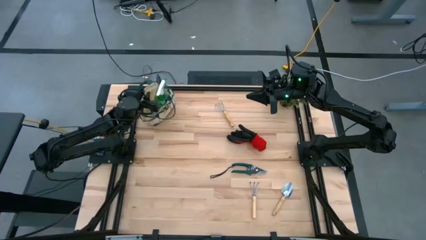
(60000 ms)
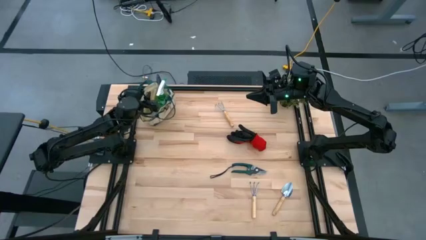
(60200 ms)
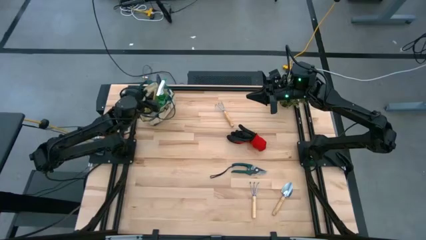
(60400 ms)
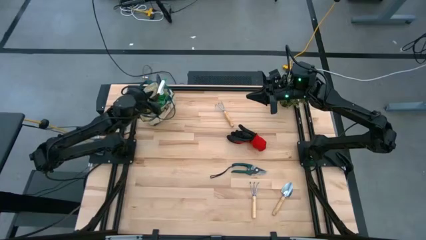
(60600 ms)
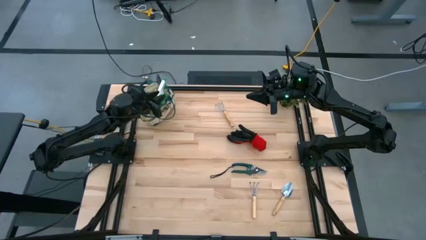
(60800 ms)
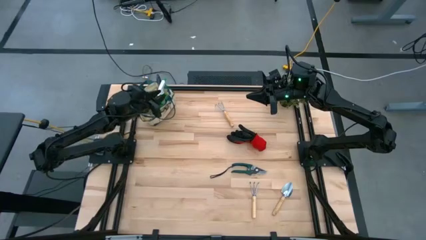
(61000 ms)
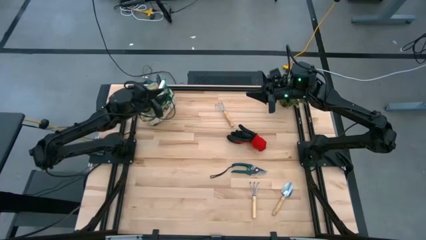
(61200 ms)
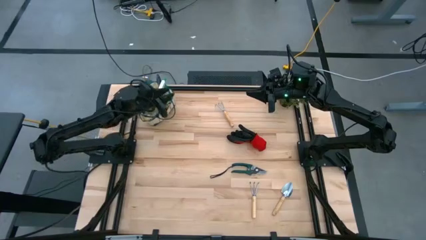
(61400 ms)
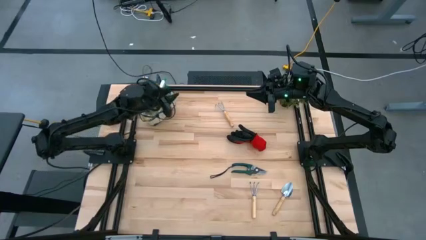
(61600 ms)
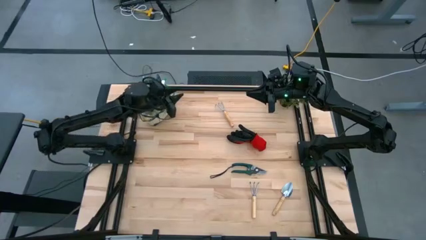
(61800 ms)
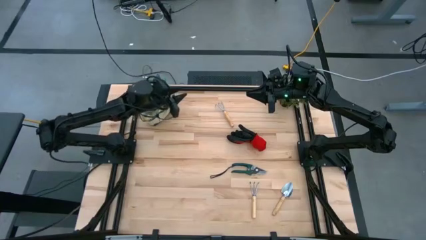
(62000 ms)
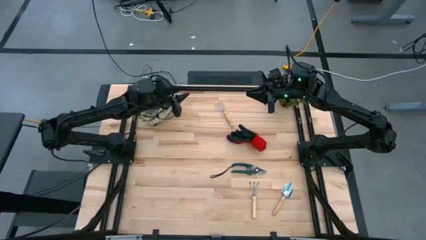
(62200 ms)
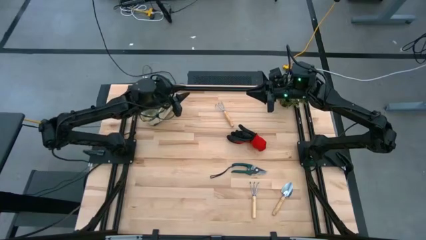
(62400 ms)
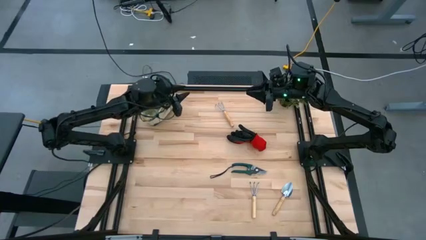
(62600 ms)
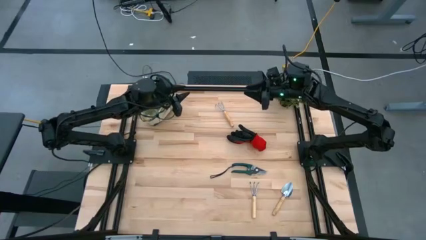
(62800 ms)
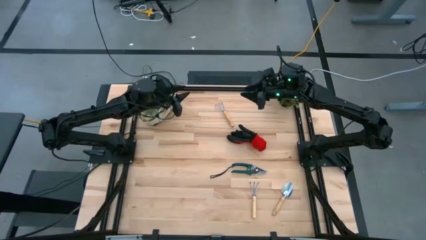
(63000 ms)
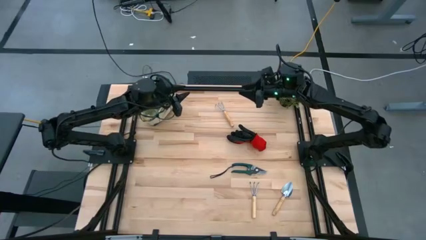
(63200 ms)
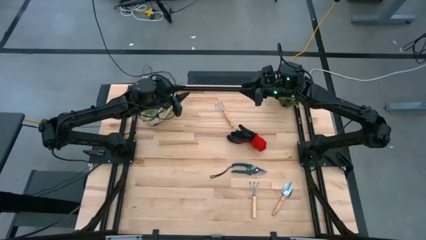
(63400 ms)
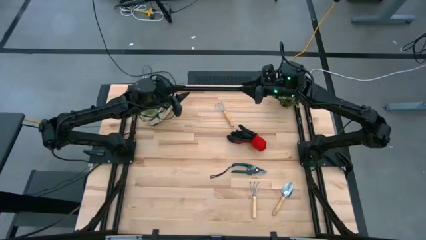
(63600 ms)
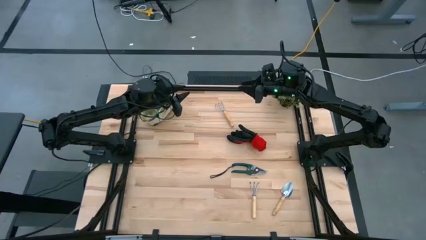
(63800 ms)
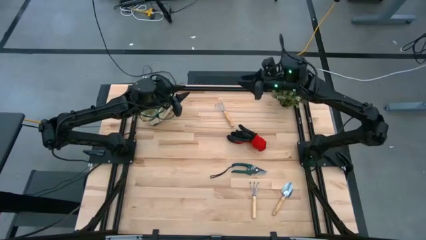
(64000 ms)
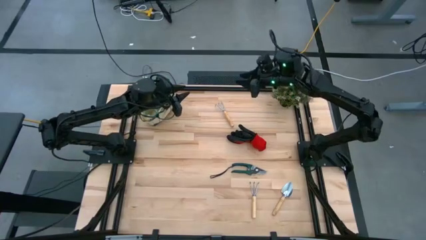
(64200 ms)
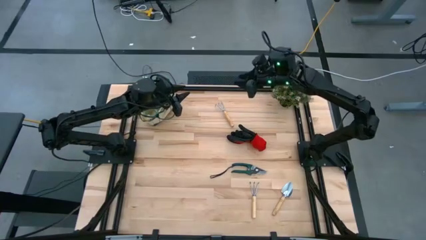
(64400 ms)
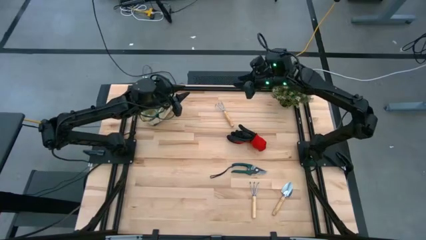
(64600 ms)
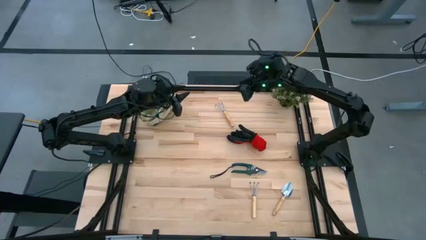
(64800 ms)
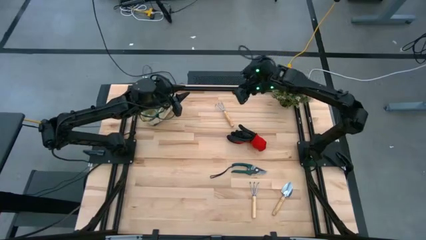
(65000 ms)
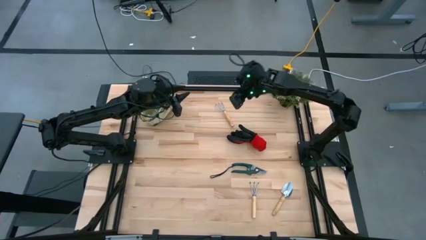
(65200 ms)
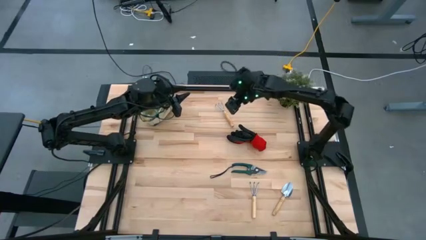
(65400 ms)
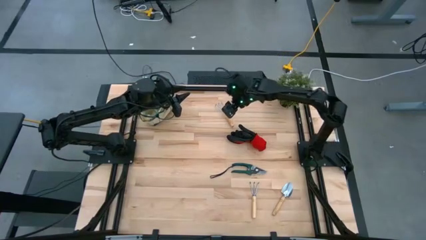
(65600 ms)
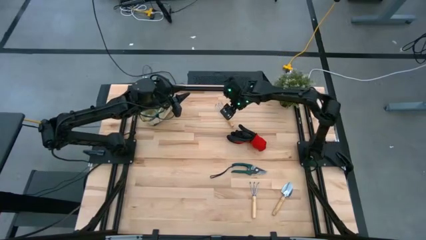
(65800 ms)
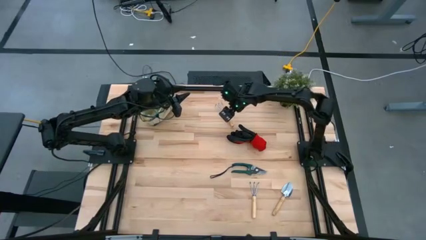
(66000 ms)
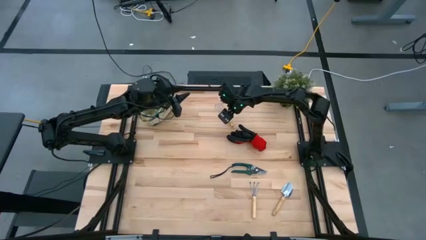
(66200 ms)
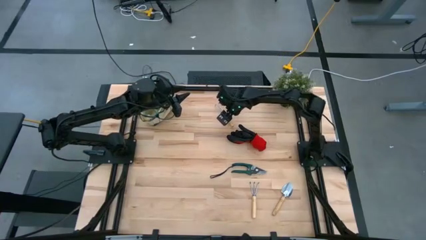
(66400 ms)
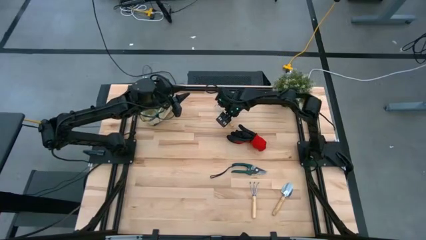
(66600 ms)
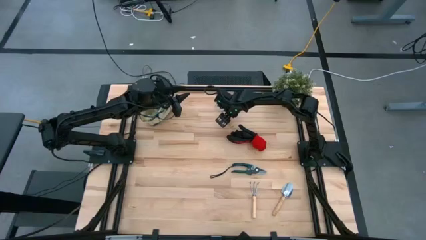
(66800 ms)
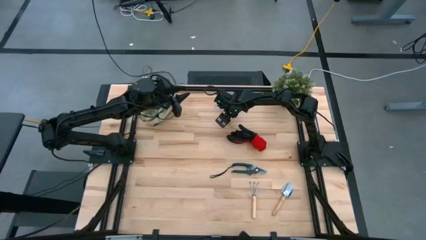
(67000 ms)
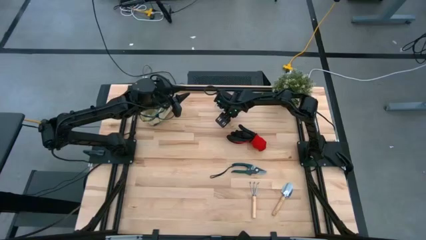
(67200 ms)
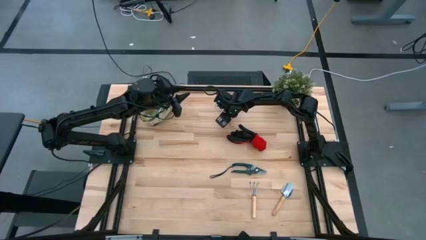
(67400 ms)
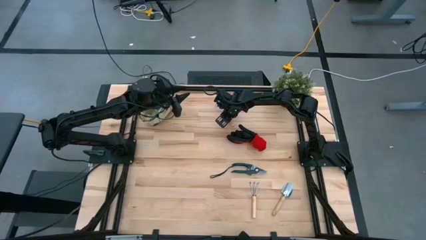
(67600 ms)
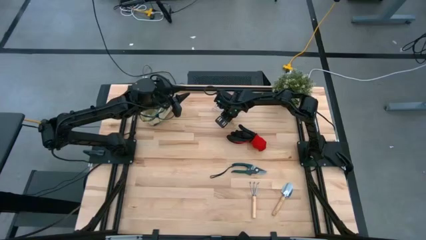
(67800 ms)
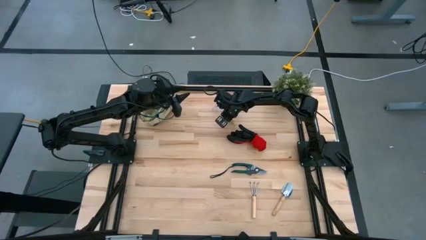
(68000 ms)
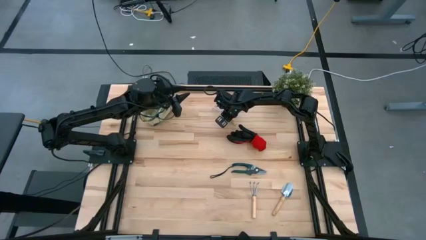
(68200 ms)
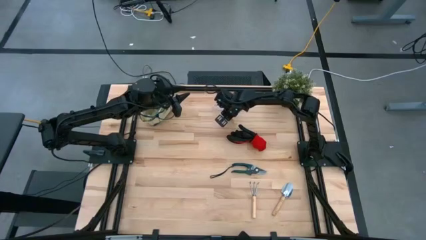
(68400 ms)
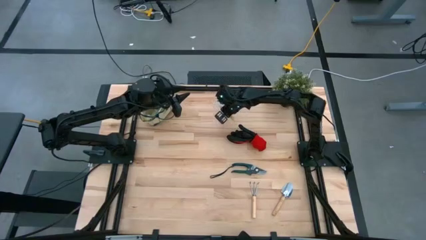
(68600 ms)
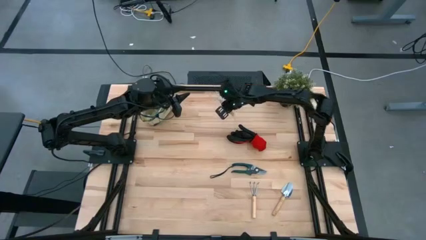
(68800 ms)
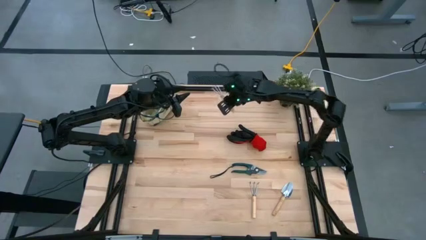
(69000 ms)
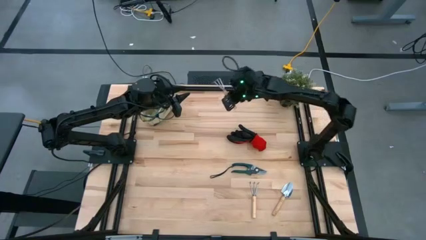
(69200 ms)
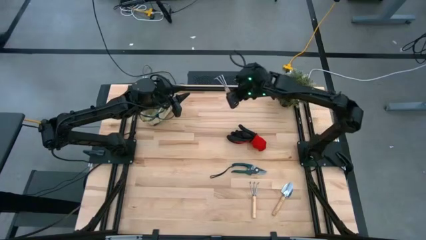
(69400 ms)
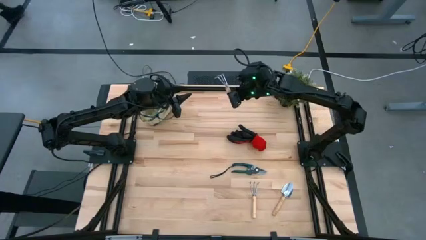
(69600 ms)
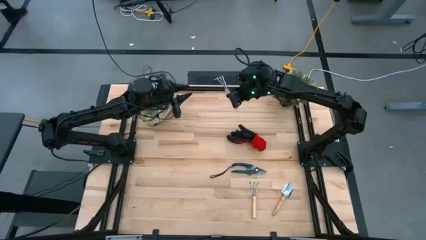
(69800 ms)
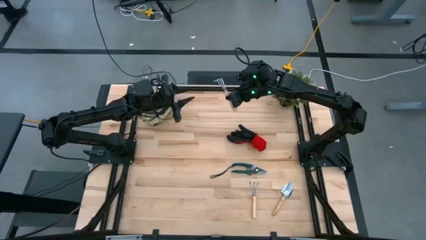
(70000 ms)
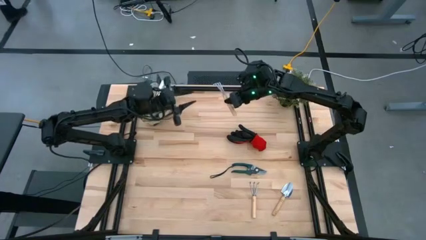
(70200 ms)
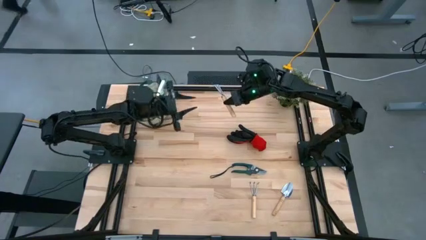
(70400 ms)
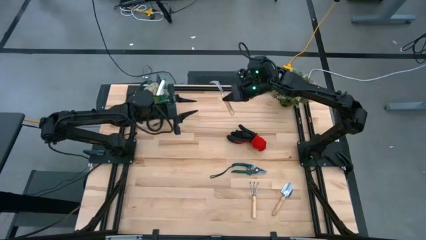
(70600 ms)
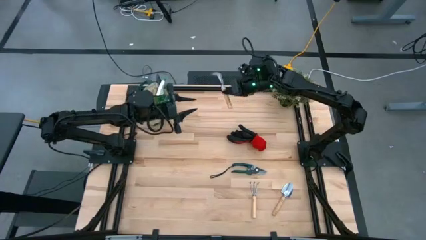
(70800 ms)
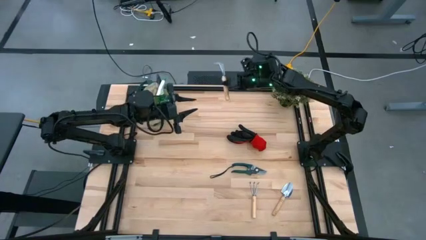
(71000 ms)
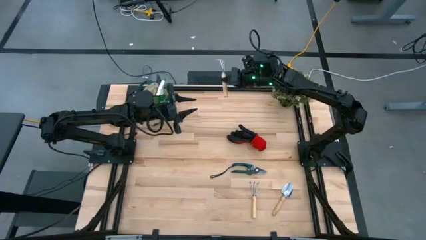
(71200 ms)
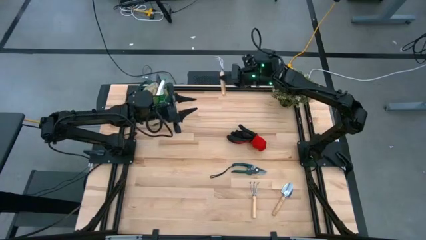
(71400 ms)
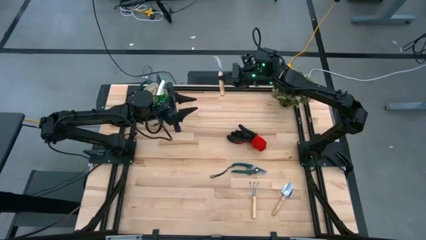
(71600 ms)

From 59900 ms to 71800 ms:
Task: Pick & Place Garden tools in Gardening bag
Put the top brown hand rake into the gardening bag
